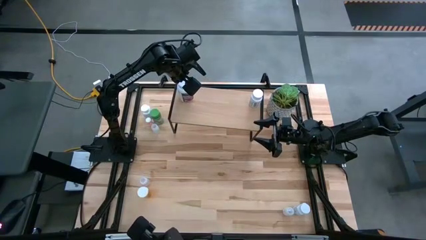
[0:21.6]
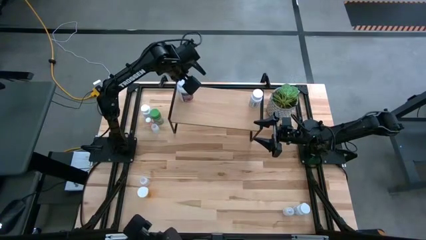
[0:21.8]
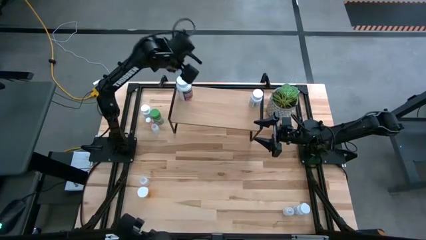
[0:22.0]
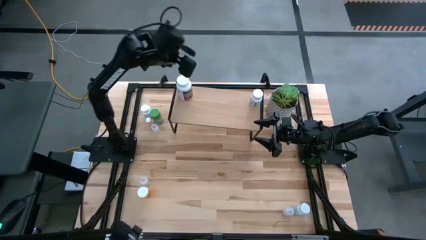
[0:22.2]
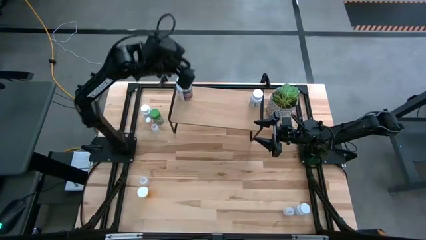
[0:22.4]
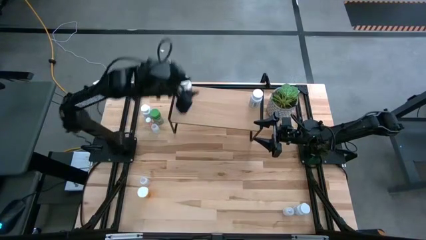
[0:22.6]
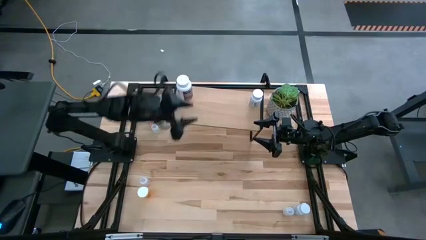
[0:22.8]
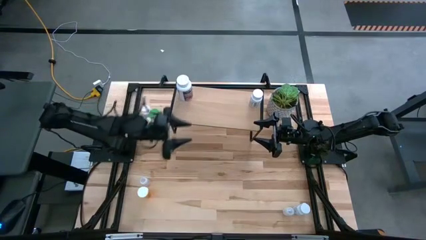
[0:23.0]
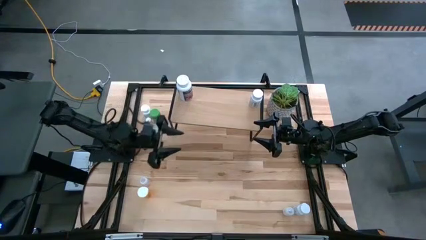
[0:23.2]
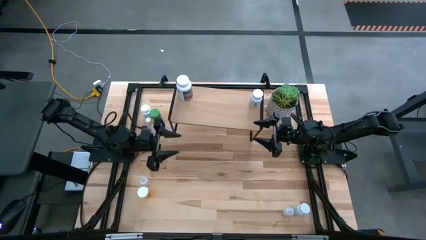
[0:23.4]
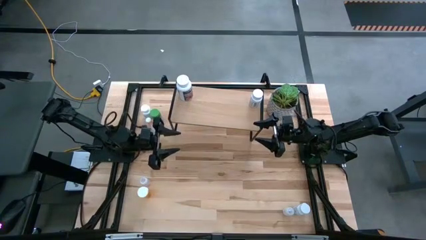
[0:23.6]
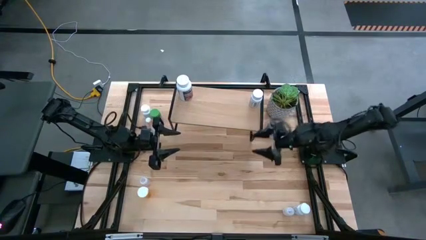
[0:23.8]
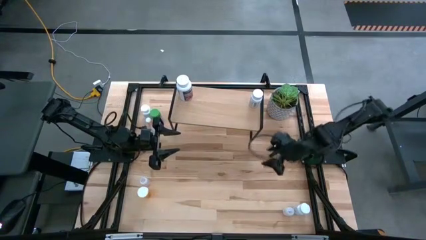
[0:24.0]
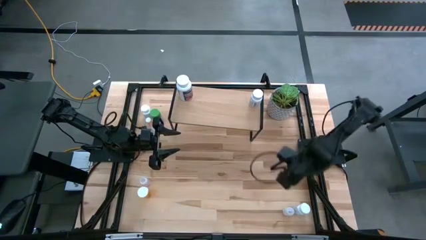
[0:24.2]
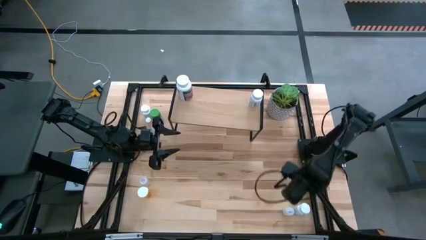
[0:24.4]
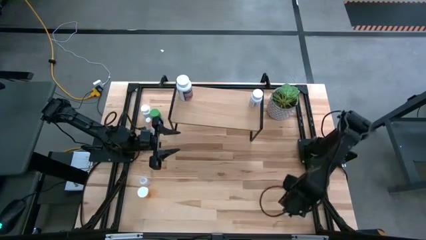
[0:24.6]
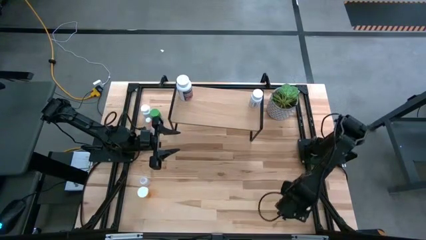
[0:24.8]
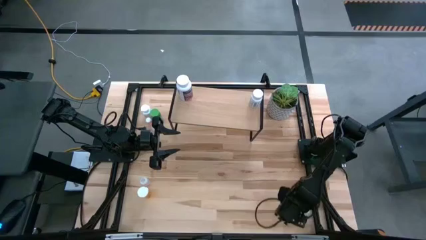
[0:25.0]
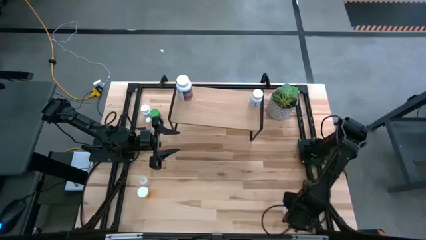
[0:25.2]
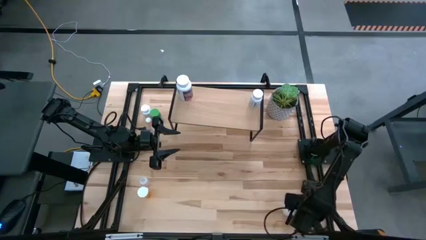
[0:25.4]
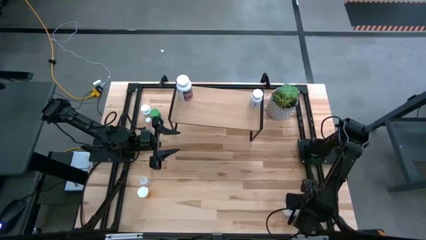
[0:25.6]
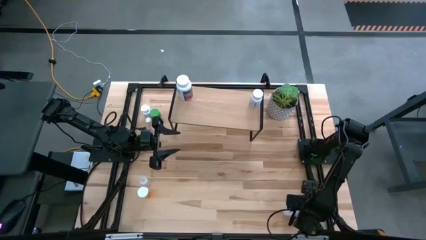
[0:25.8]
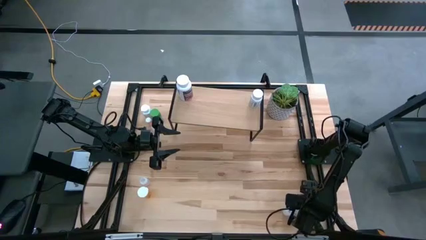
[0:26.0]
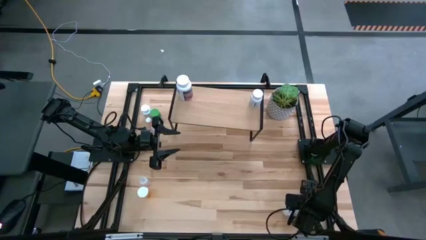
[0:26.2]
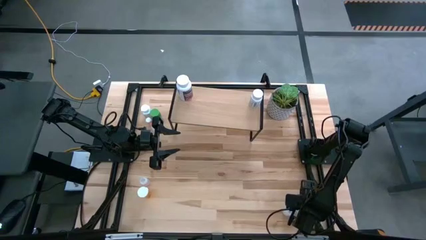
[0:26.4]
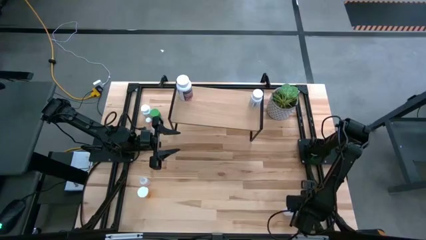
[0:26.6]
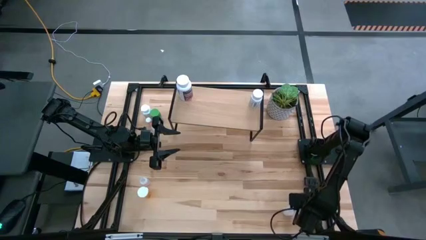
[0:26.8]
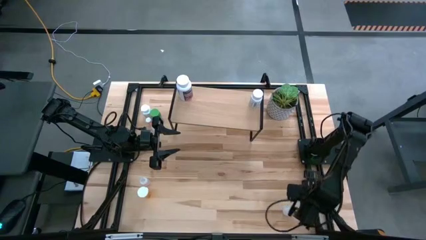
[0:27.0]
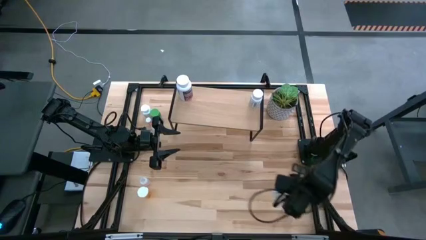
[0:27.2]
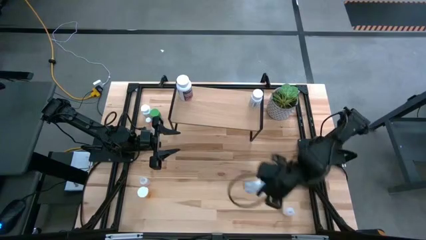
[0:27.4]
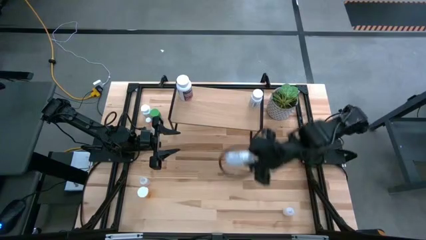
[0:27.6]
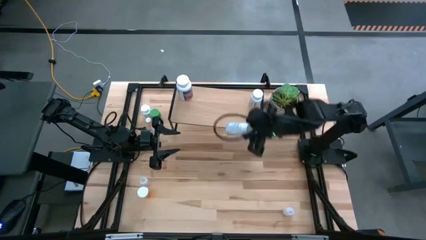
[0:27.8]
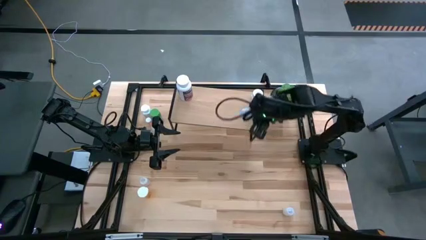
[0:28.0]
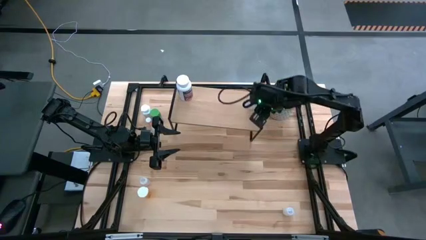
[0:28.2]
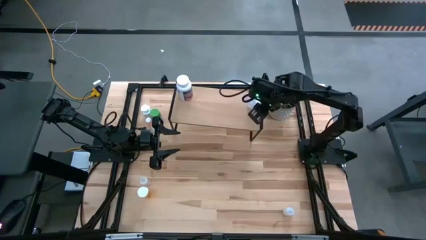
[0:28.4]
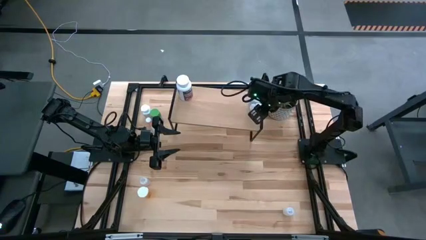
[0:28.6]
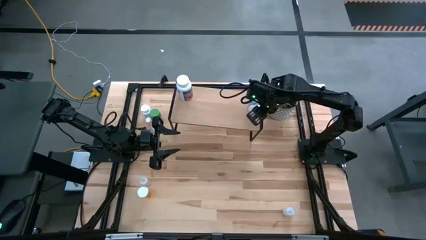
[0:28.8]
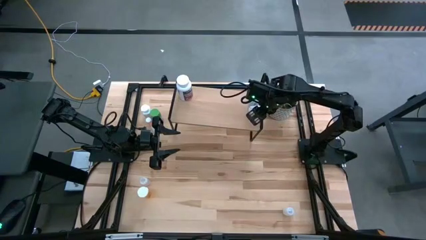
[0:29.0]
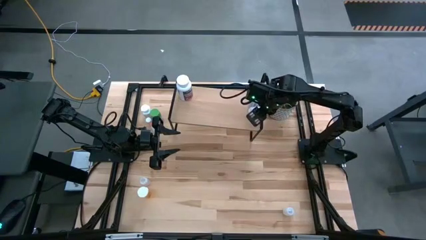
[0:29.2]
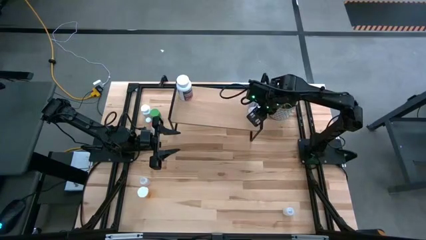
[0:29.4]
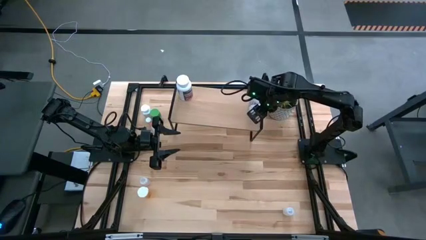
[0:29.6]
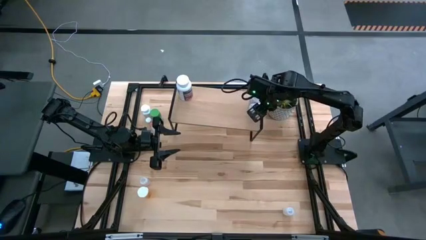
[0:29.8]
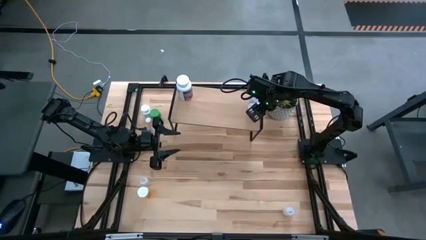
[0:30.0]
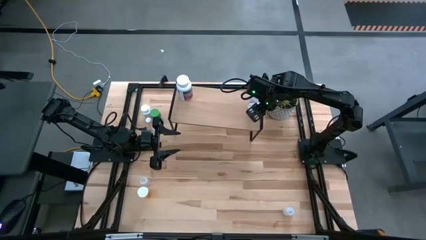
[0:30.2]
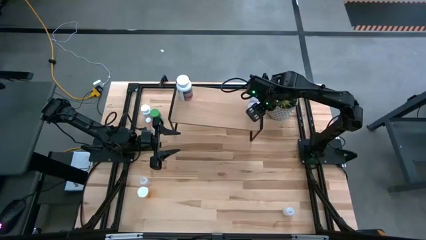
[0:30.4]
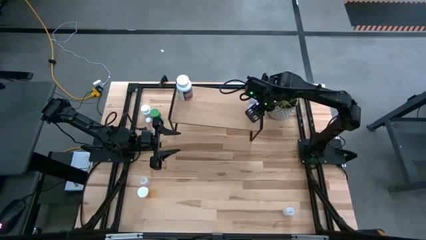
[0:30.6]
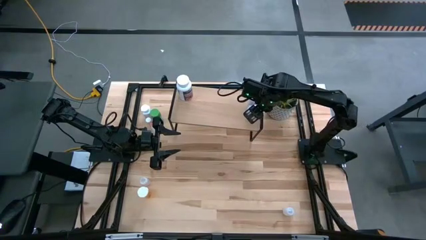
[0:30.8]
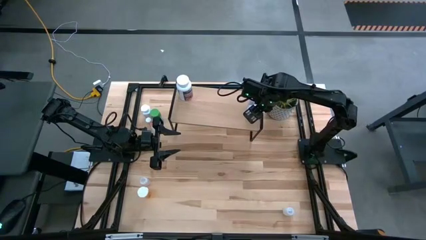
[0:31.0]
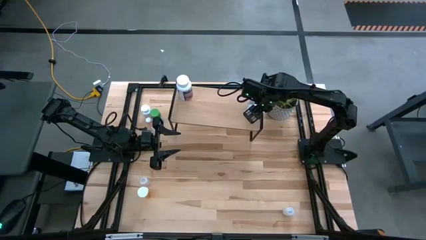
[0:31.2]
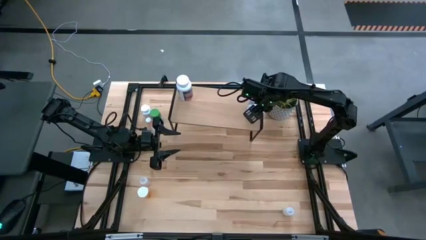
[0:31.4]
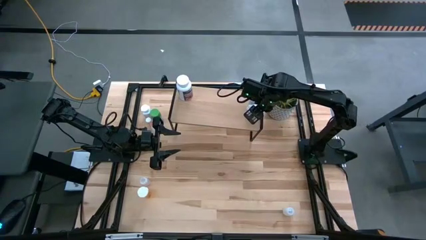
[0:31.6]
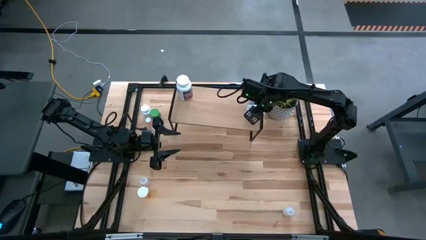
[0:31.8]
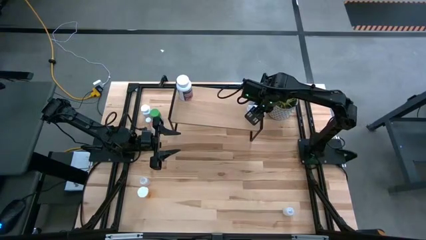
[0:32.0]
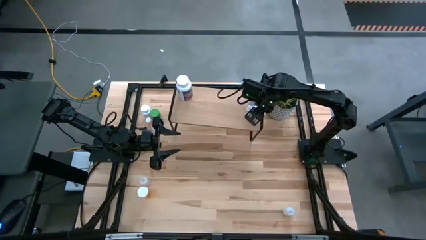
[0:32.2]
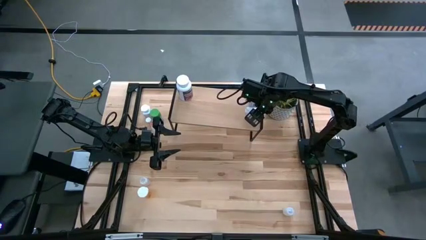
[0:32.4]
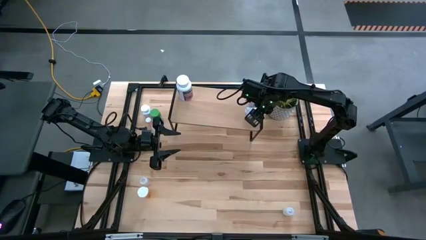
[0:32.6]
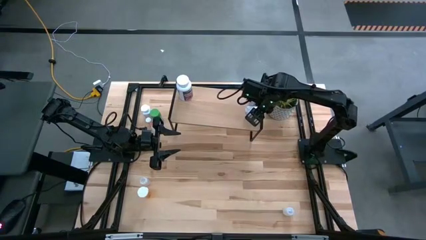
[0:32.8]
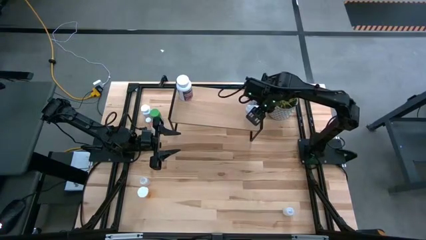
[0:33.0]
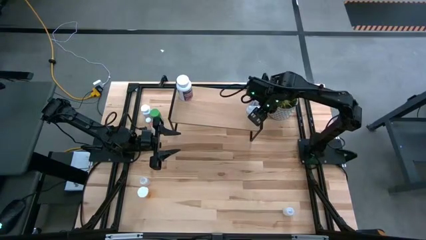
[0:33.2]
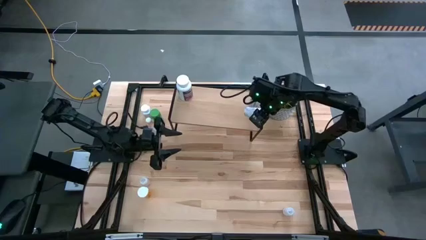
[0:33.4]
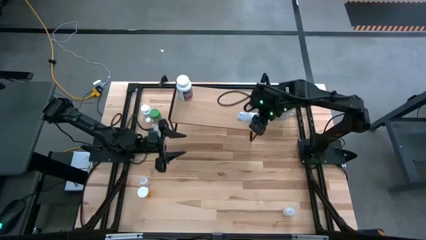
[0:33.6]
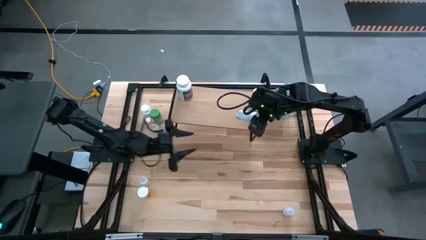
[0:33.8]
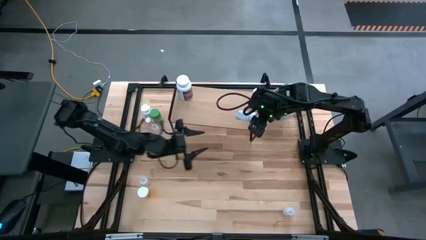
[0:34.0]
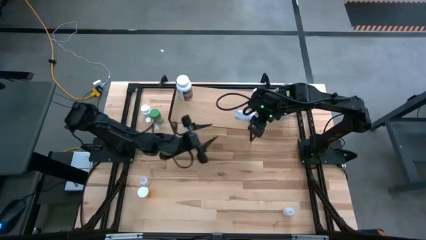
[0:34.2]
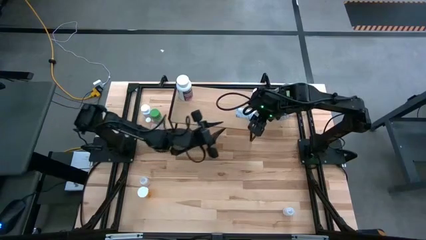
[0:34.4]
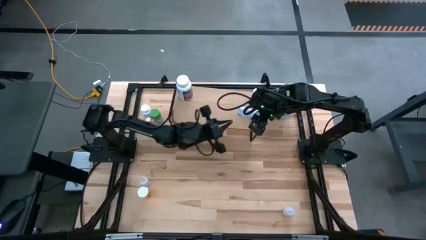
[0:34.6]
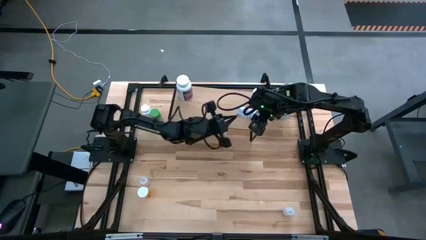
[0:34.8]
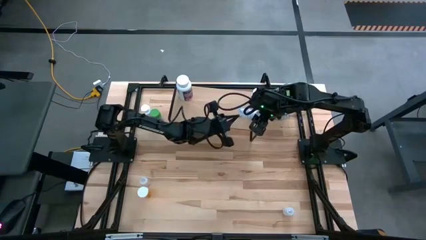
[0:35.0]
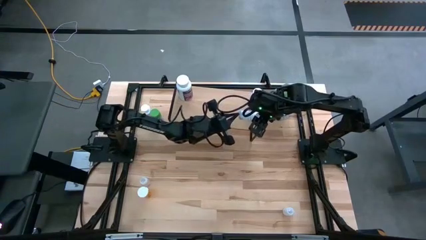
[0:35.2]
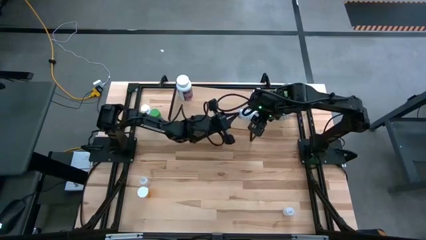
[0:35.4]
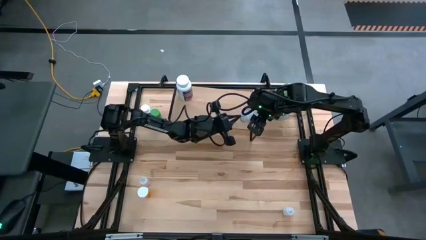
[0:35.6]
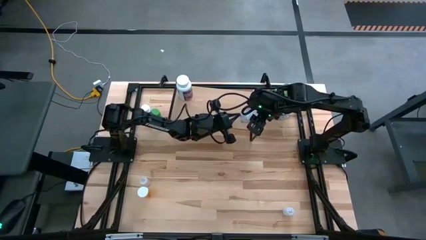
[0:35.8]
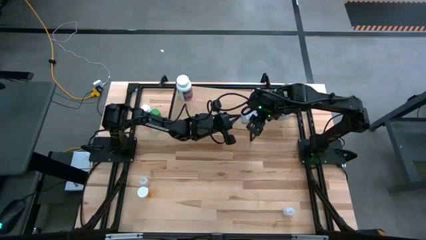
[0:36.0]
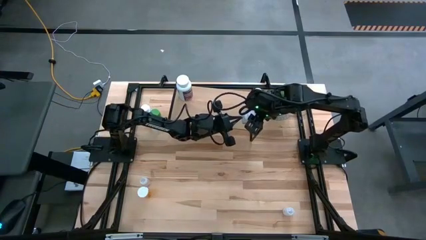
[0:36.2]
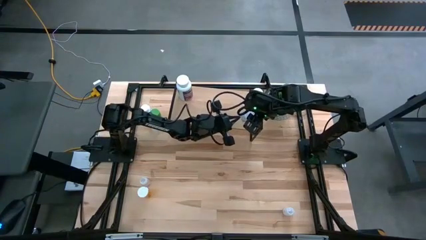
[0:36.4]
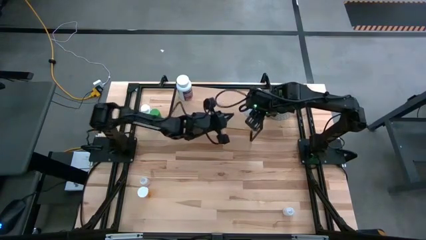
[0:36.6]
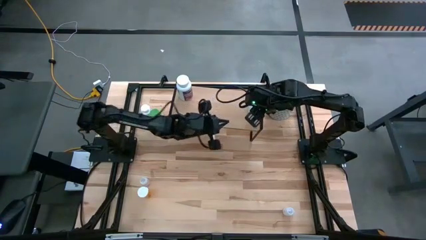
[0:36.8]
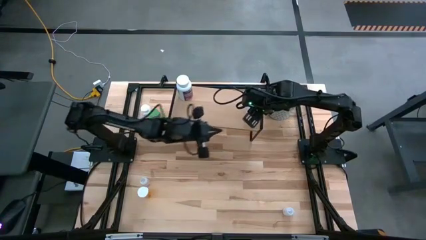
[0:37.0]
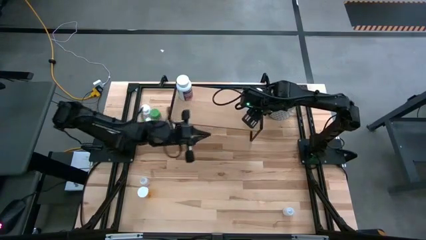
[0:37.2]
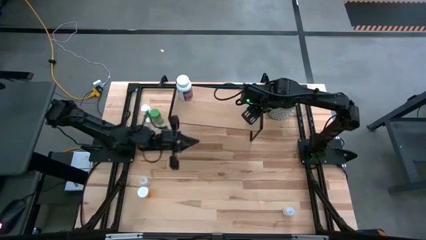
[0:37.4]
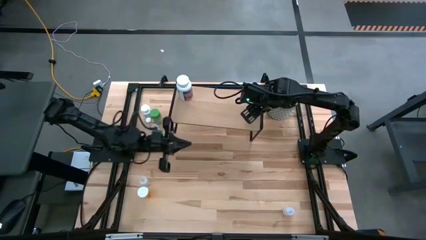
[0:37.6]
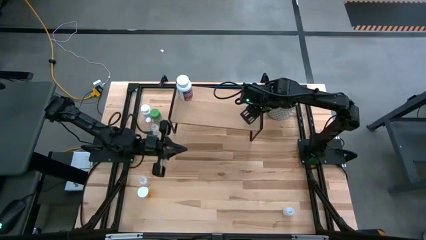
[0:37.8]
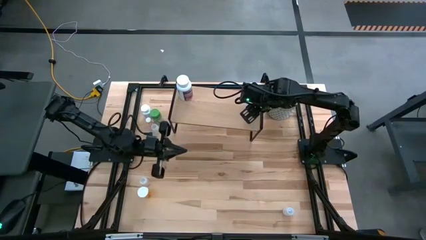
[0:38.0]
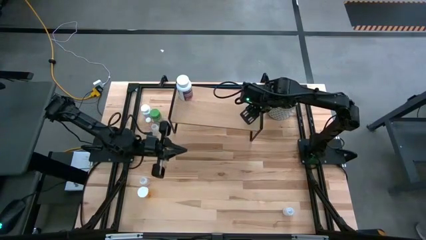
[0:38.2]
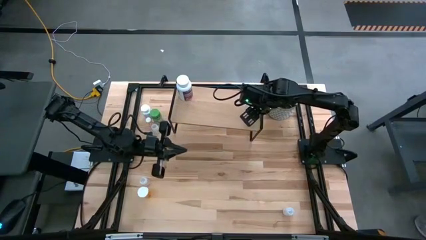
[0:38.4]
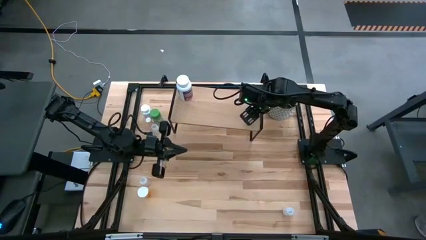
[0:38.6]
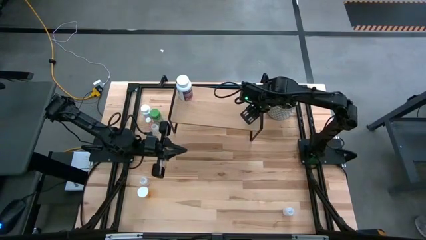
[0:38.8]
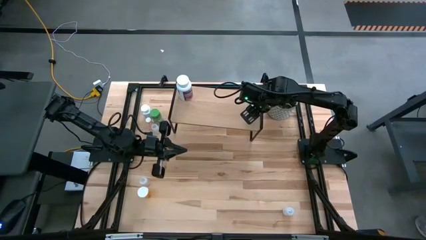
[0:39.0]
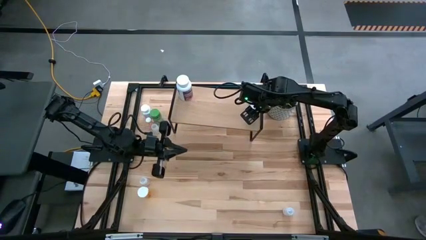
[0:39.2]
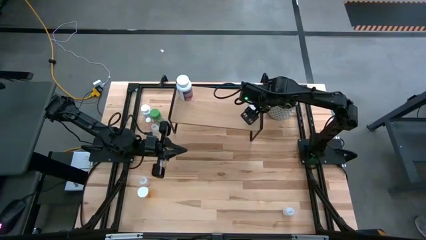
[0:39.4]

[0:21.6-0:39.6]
Task: Pick and place medicine bottles onto shelf by color
Put the white medicine bottle on the shelf
